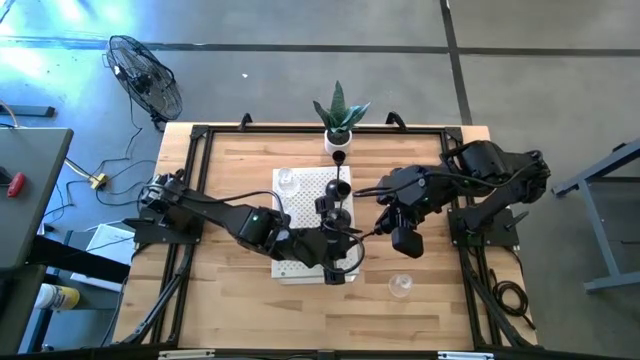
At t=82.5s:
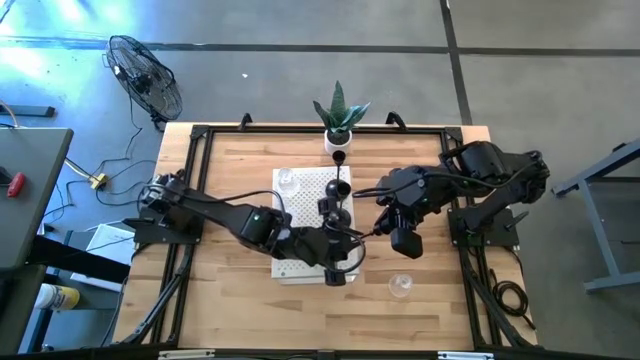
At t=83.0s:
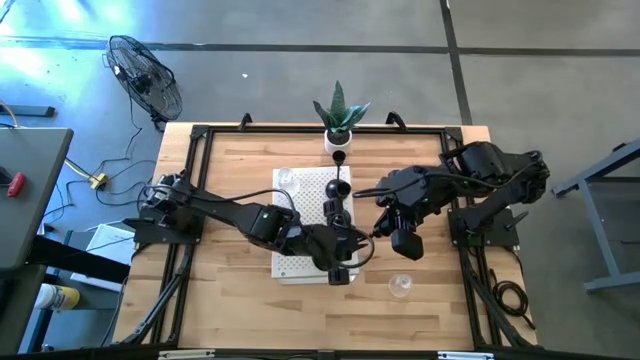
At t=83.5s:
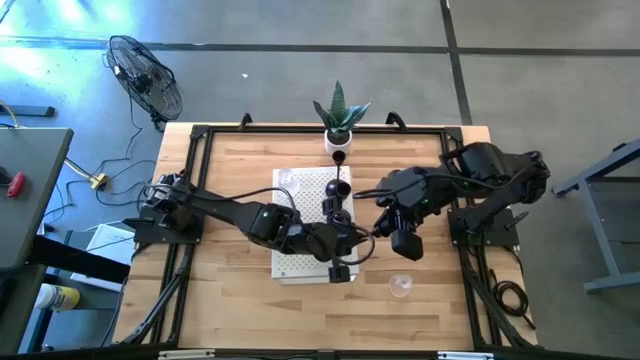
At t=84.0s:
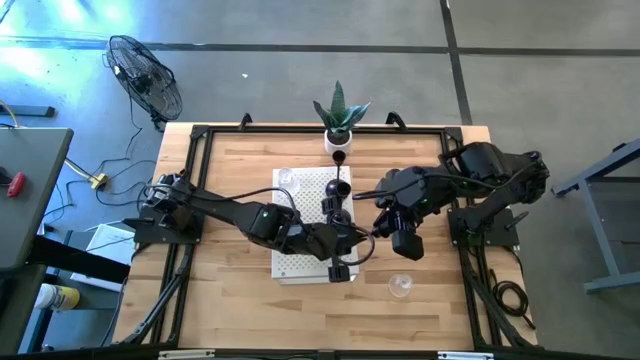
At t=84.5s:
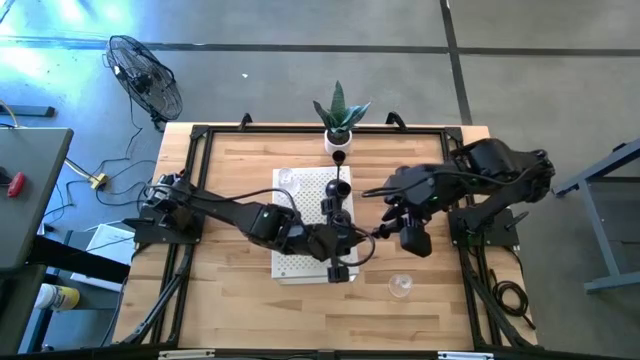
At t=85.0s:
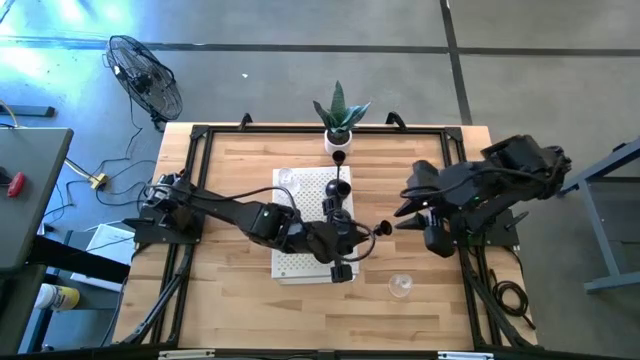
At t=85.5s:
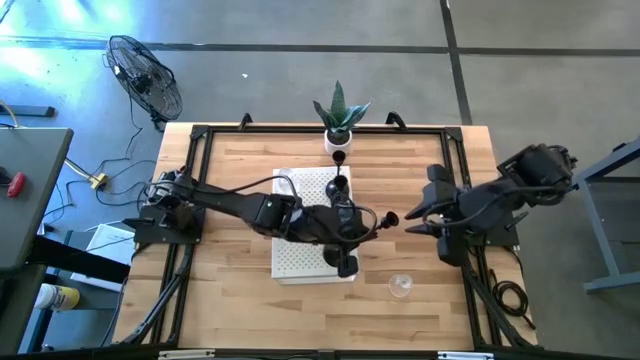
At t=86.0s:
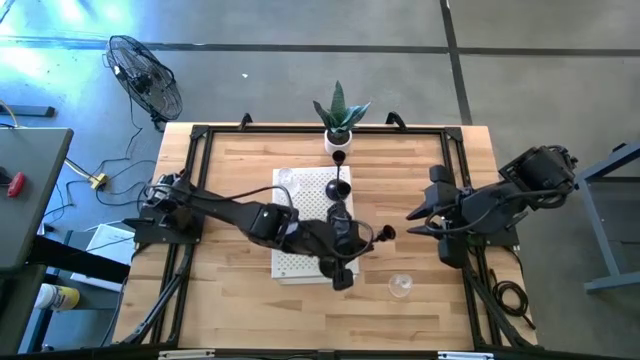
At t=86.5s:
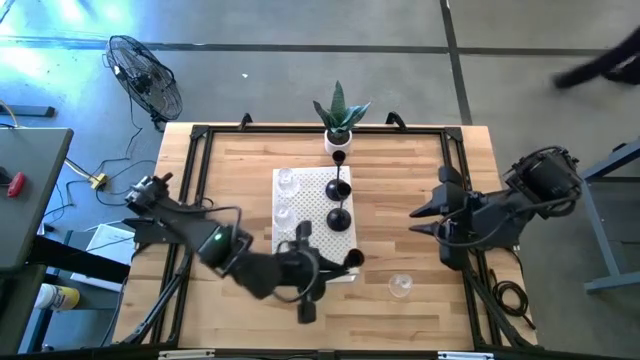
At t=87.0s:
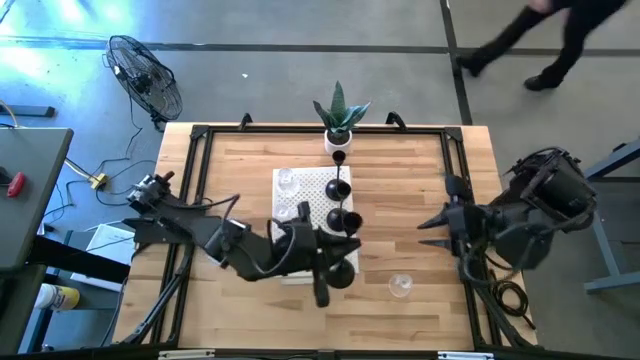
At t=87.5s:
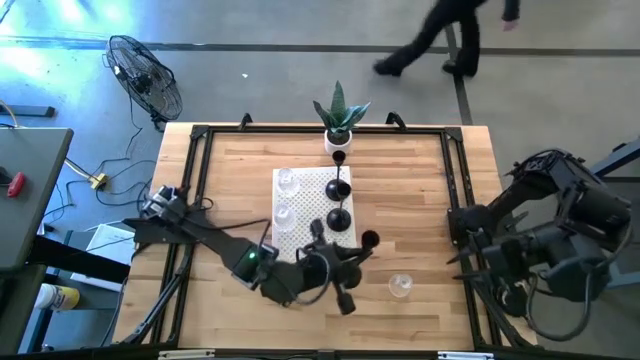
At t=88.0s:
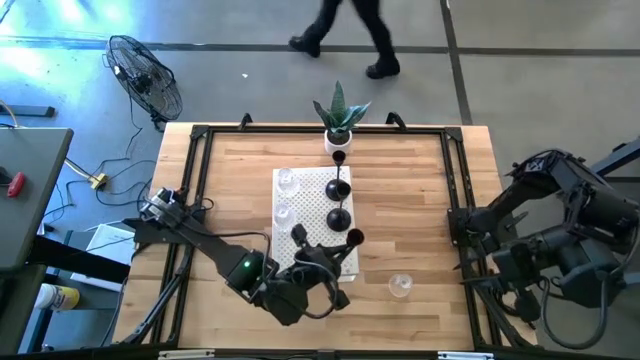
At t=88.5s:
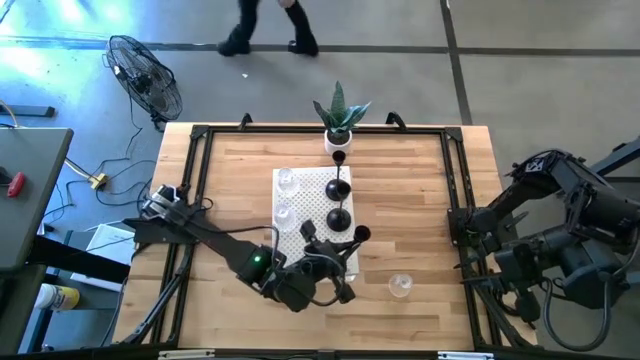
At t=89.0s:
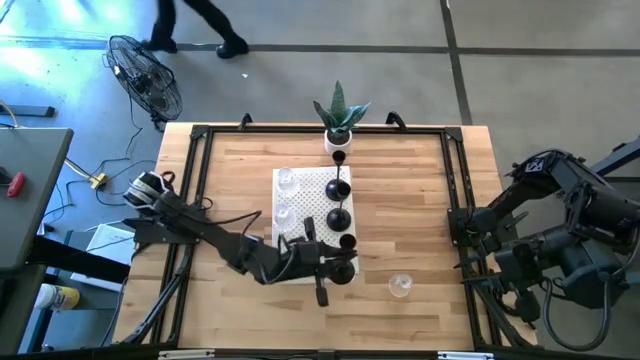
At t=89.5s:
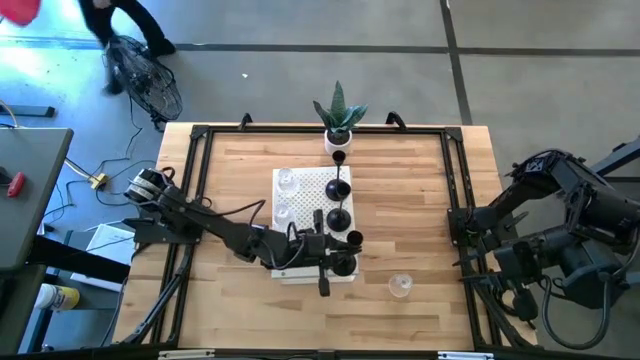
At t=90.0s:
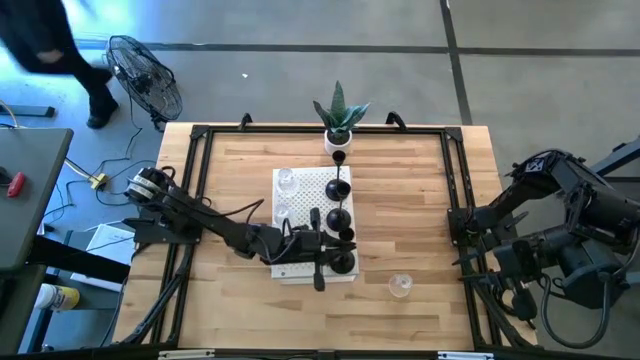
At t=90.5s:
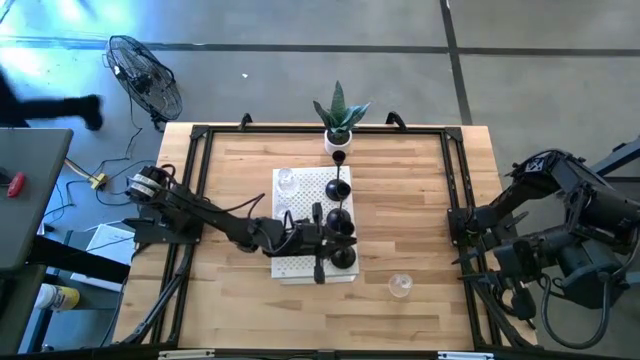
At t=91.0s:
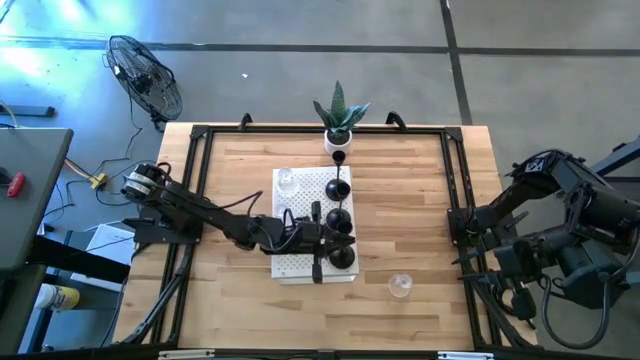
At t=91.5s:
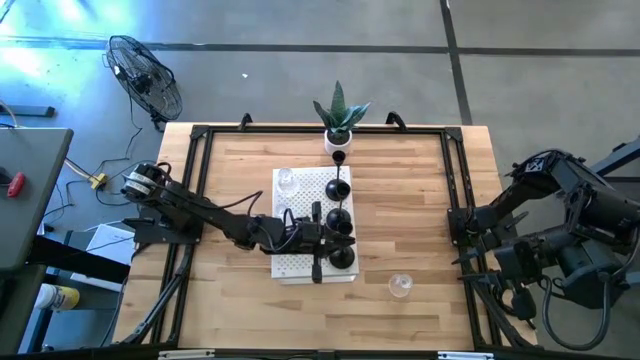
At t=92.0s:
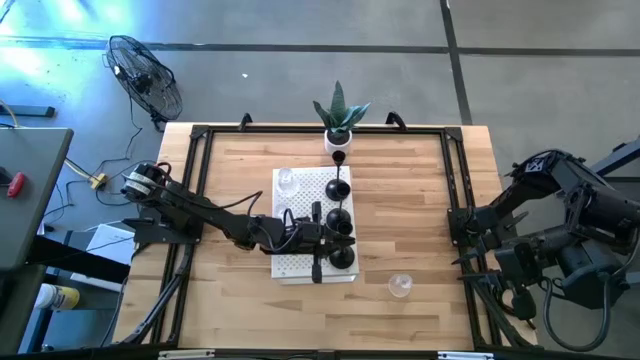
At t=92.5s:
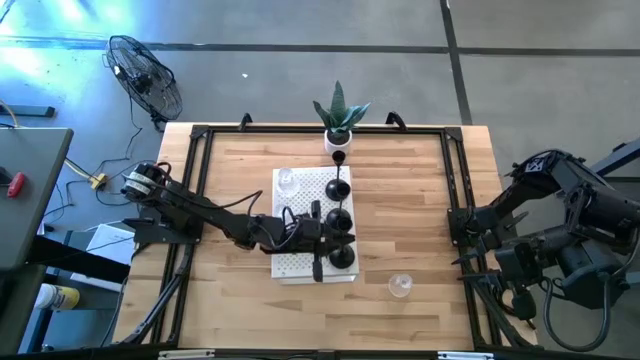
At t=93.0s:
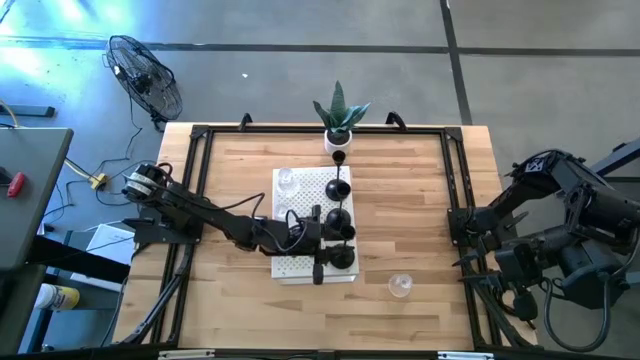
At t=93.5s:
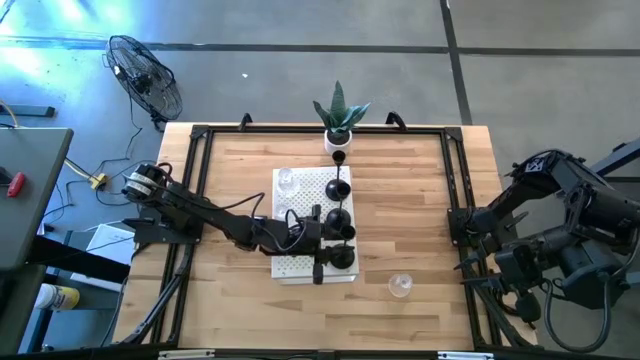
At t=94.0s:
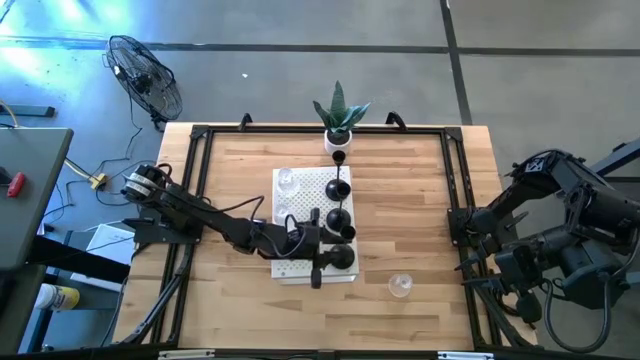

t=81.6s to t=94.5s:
Task: Pick & Place candle stick holders
Put the black candle holder on the shelf aligned with the other black candle holders

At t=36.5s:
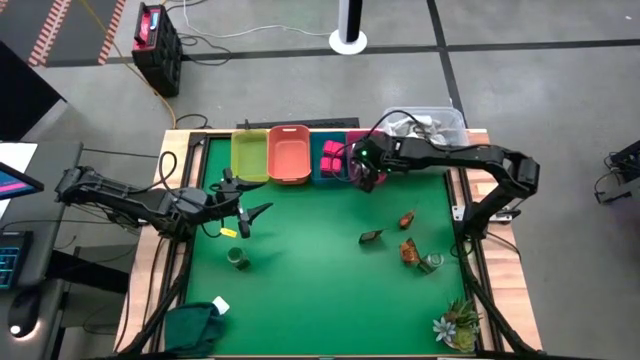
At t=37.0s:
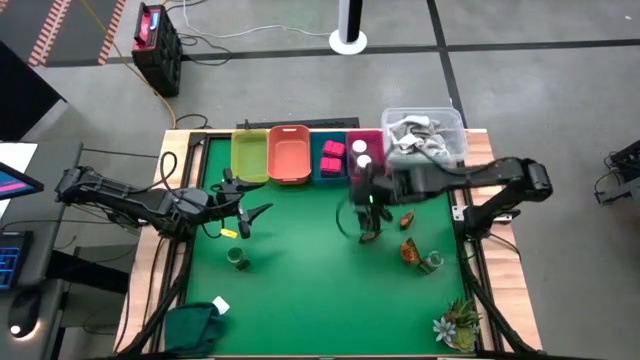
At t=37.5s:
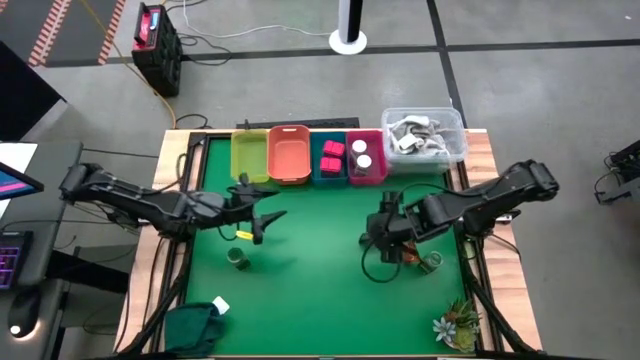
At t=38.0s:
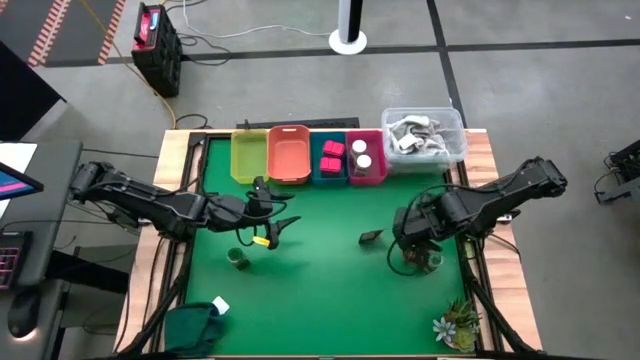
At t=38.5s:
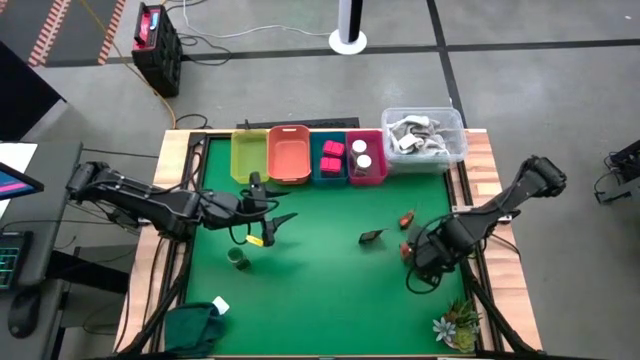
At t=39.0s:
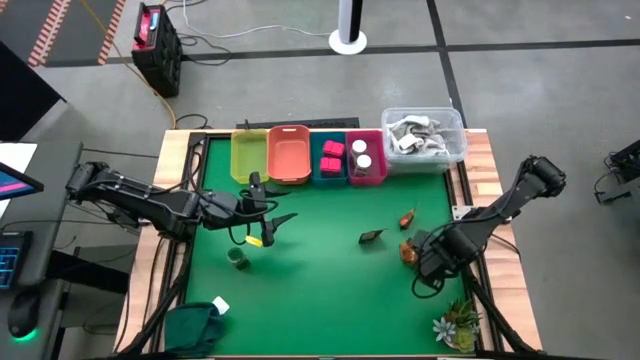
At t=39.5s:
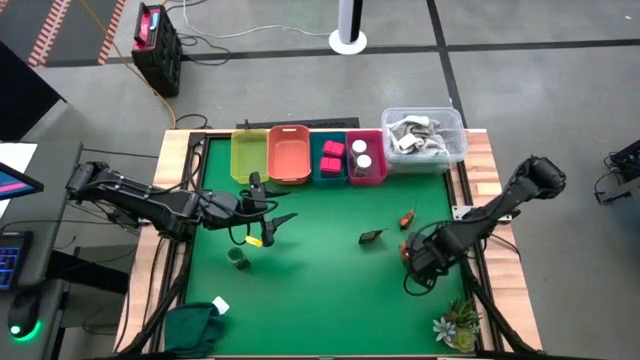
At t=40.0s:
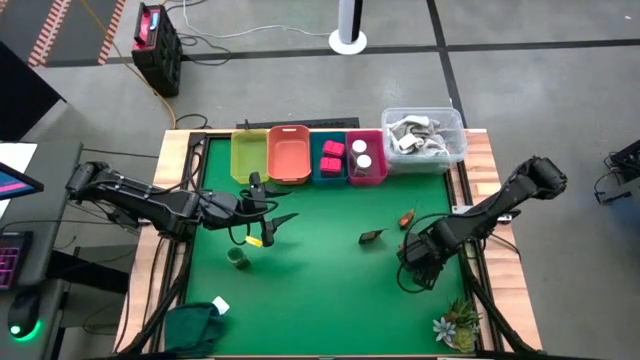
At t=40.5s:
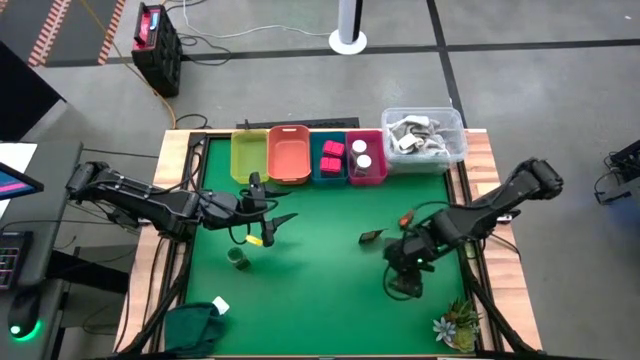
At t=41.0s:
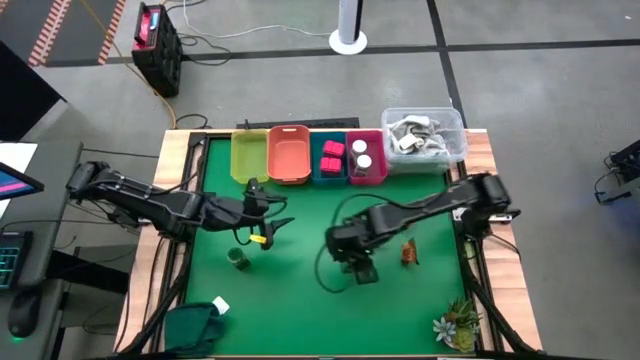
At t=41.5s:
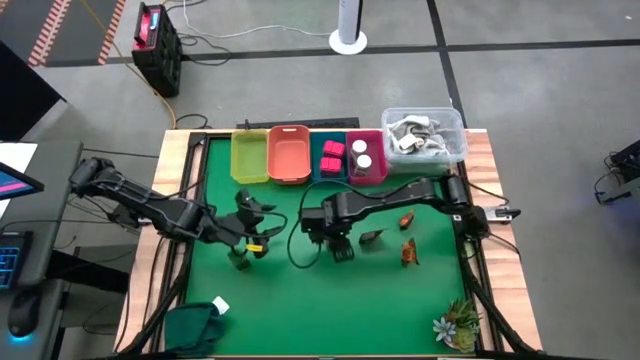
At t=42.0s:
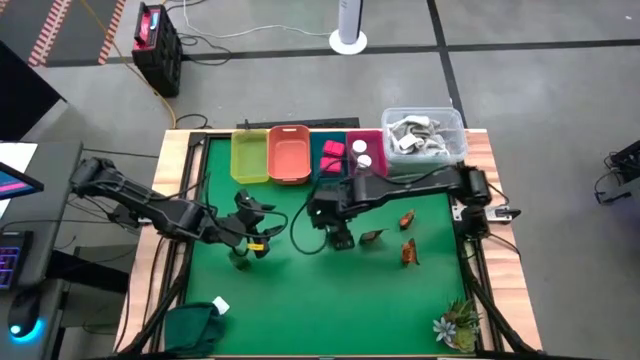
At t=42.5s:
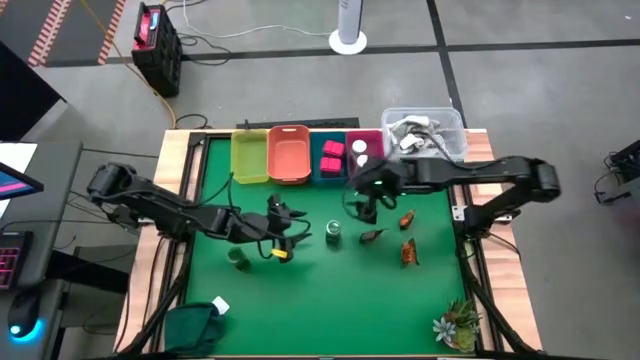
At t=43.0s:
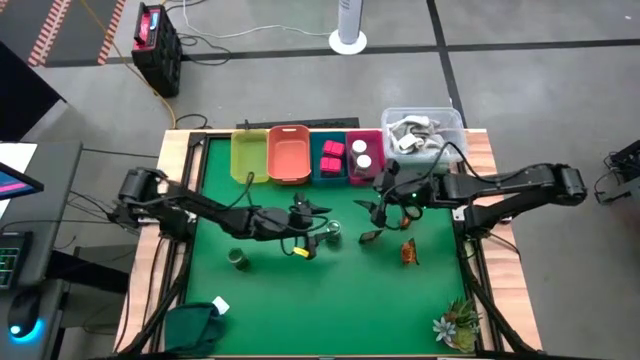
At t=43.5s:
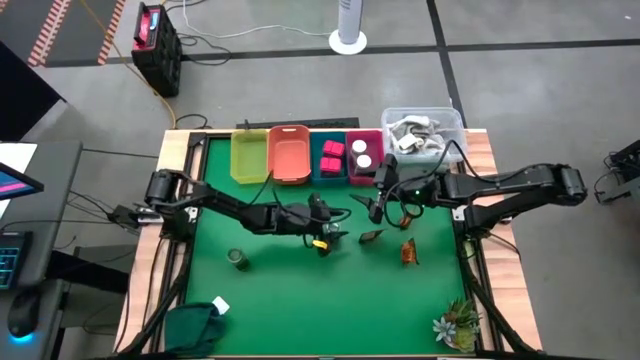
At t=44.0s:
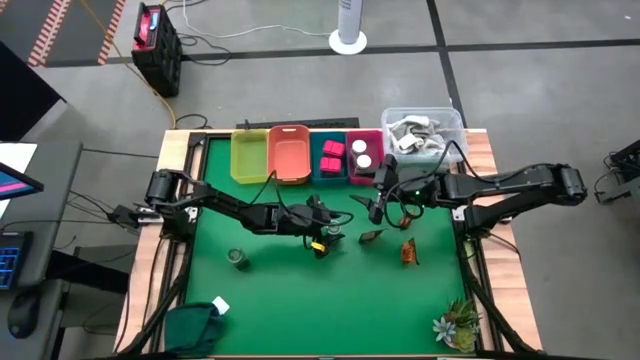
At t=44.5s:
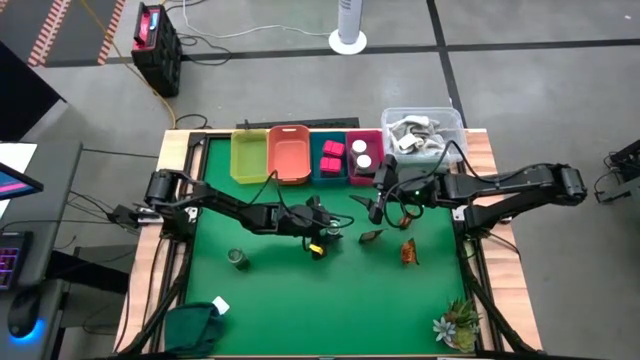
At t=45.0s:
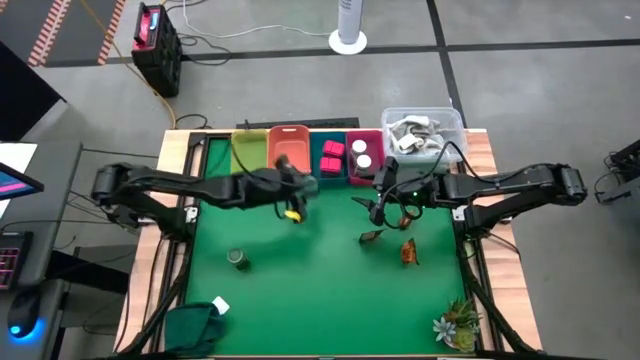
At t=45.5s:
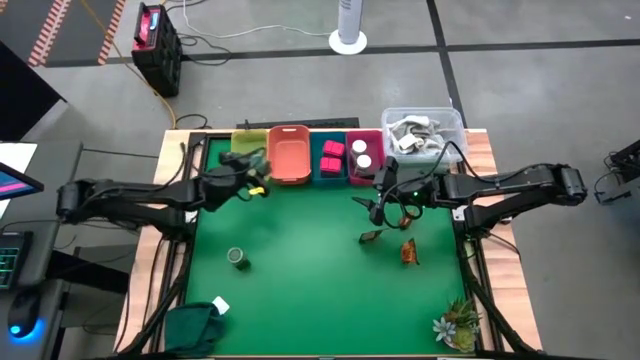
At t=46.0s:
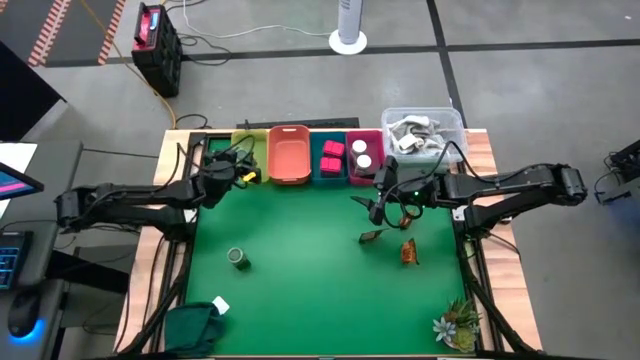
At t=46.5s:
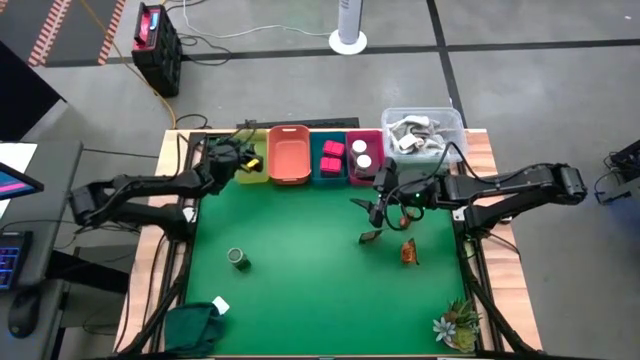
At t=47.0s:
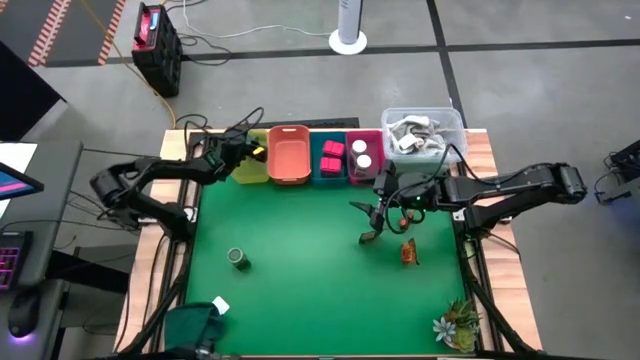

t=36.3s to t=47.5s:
Task: Sort spices by type
Put the right green seasoning bottle into the yellow bin
